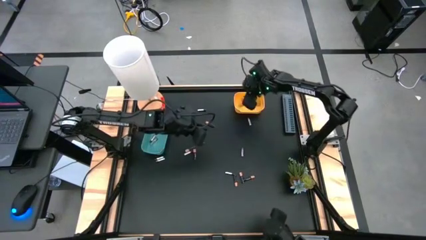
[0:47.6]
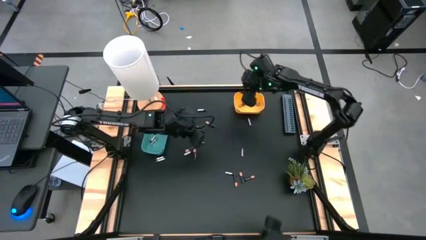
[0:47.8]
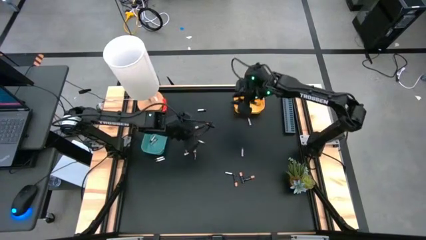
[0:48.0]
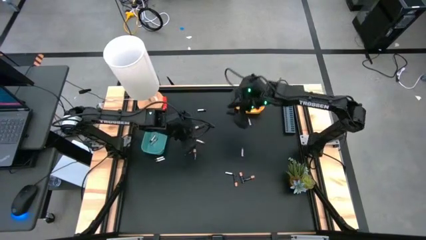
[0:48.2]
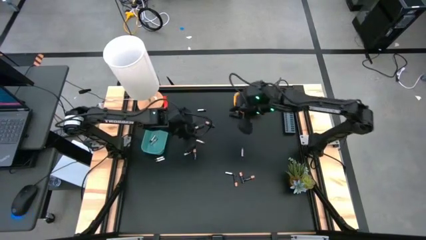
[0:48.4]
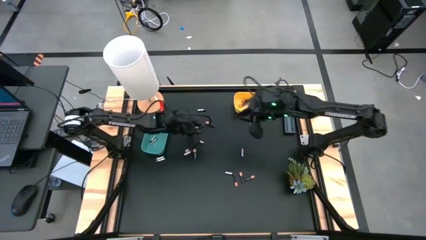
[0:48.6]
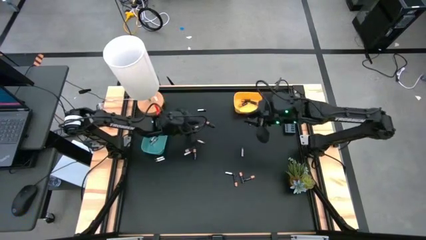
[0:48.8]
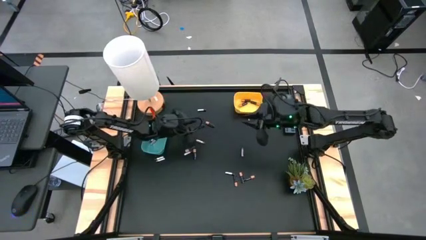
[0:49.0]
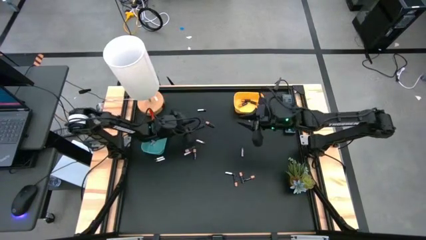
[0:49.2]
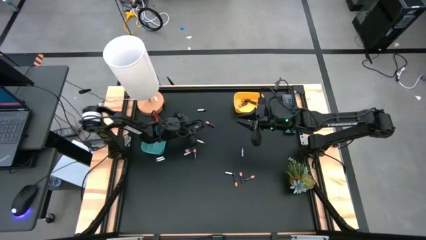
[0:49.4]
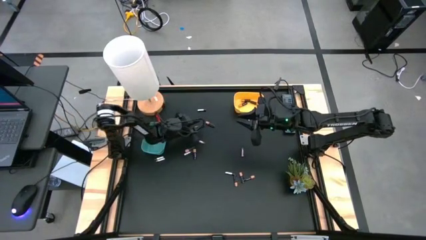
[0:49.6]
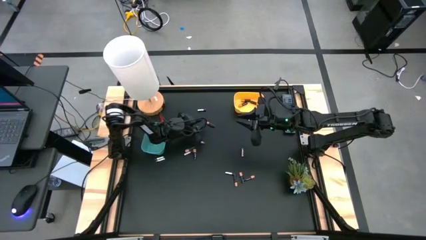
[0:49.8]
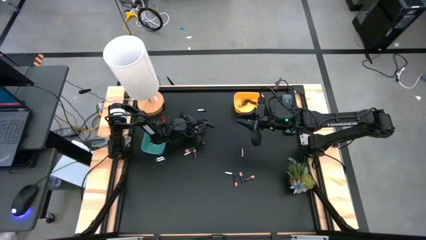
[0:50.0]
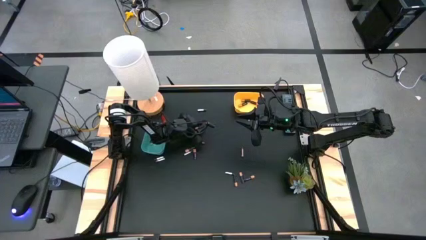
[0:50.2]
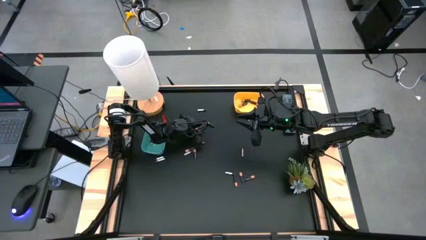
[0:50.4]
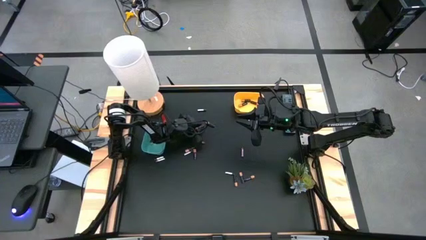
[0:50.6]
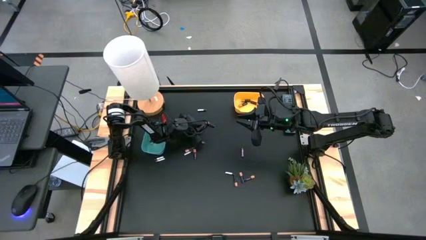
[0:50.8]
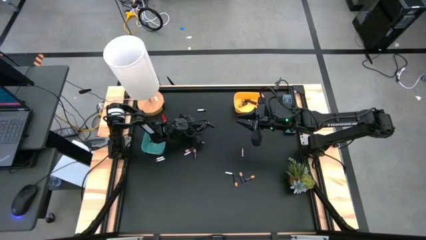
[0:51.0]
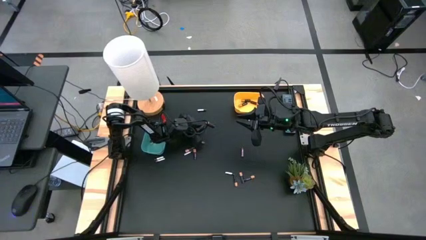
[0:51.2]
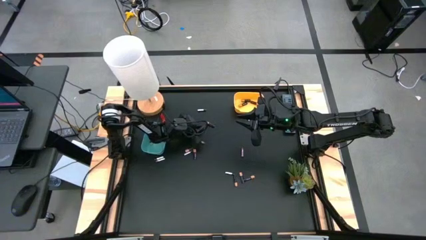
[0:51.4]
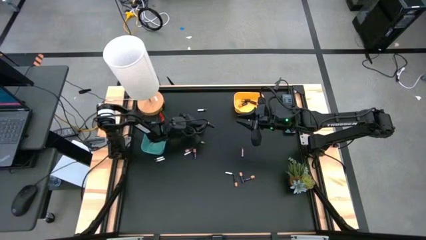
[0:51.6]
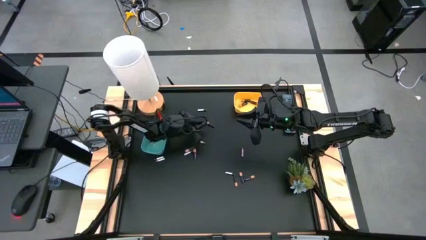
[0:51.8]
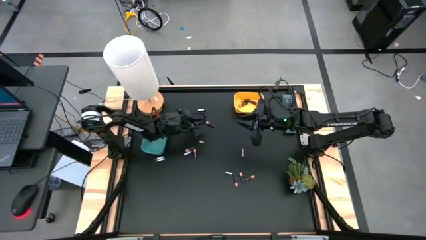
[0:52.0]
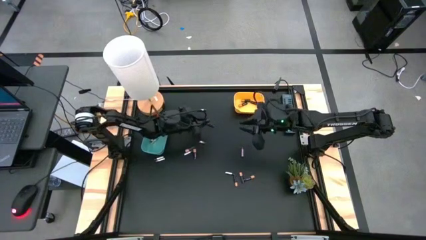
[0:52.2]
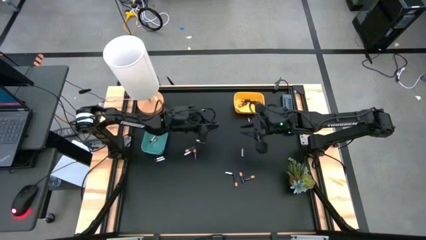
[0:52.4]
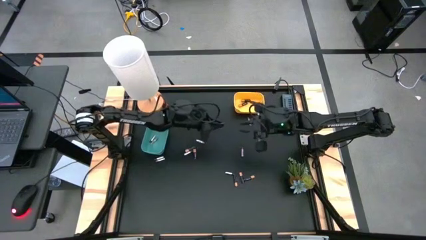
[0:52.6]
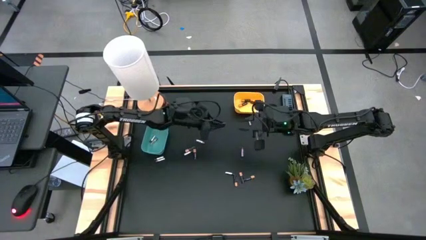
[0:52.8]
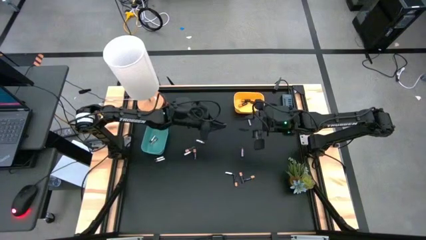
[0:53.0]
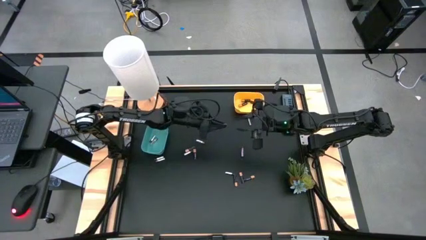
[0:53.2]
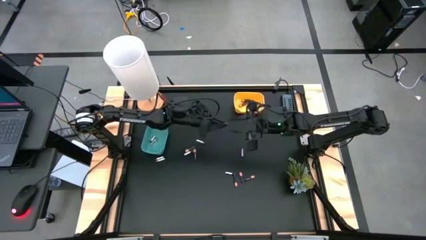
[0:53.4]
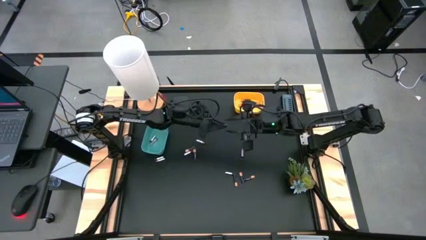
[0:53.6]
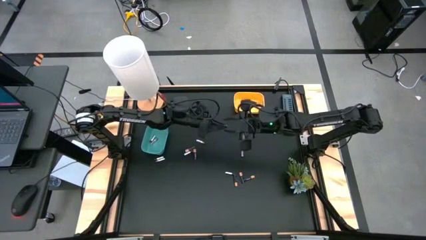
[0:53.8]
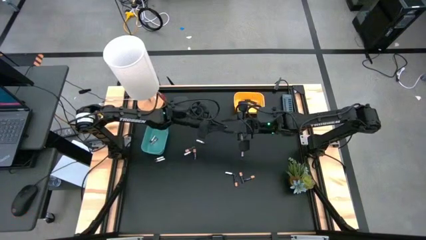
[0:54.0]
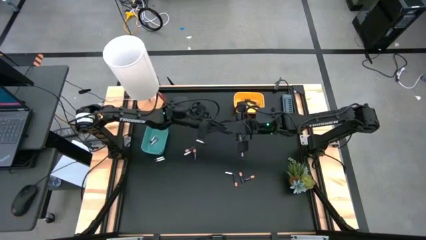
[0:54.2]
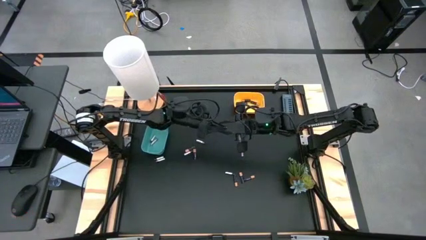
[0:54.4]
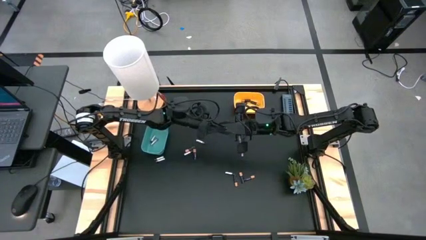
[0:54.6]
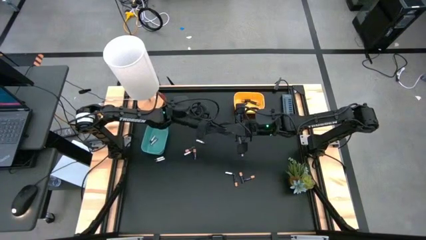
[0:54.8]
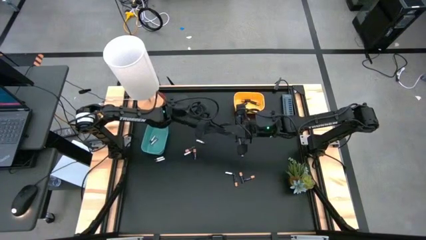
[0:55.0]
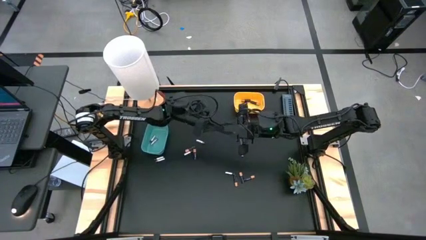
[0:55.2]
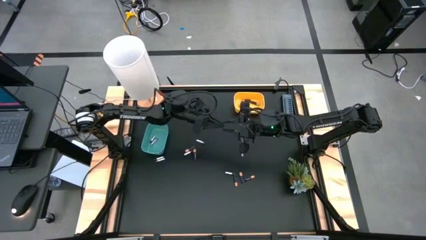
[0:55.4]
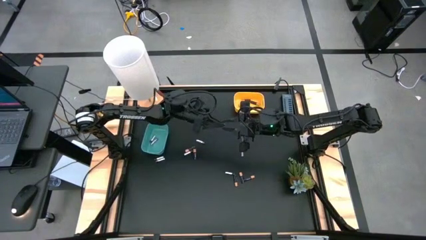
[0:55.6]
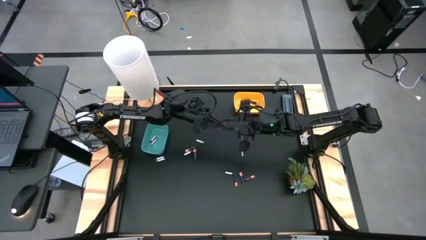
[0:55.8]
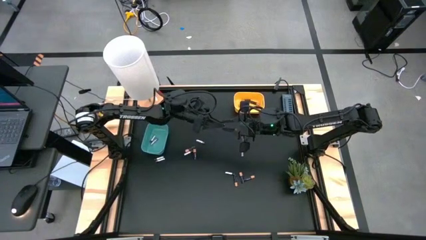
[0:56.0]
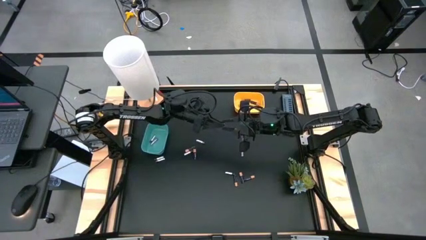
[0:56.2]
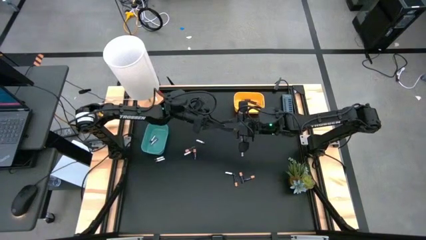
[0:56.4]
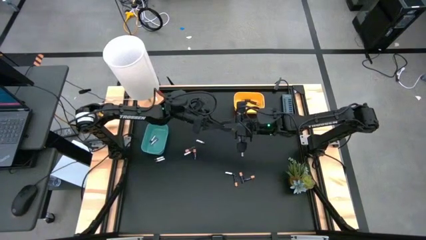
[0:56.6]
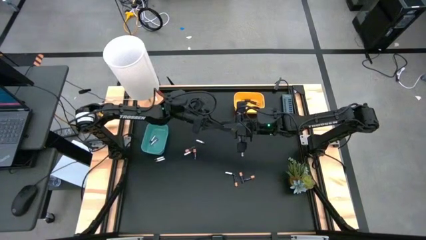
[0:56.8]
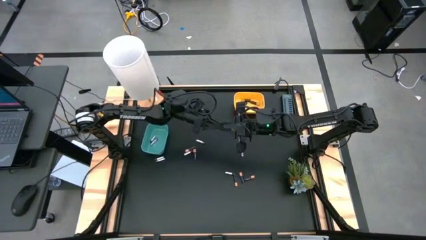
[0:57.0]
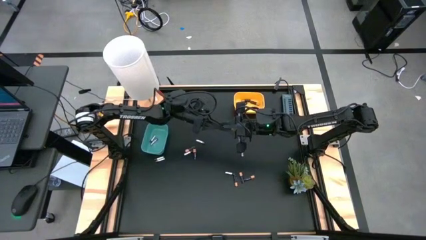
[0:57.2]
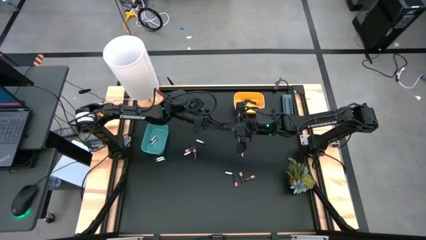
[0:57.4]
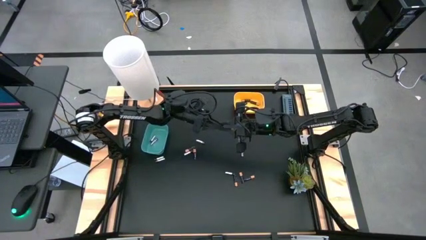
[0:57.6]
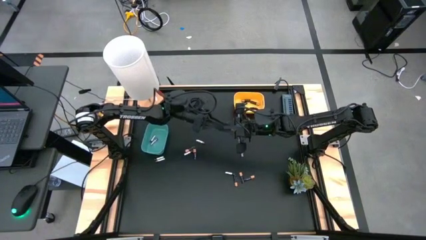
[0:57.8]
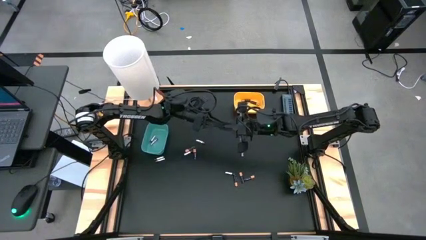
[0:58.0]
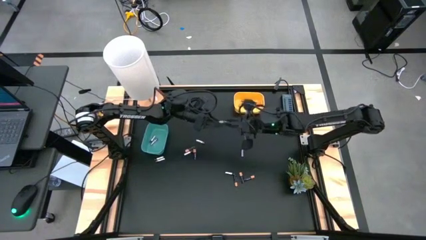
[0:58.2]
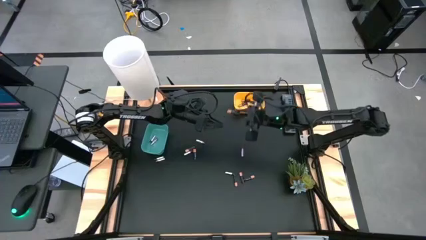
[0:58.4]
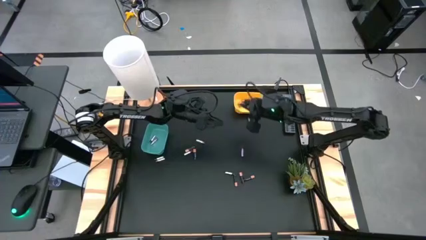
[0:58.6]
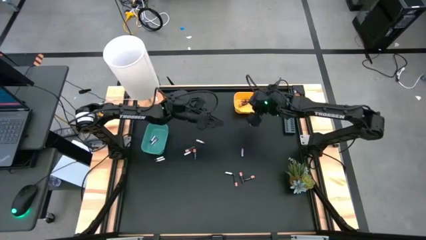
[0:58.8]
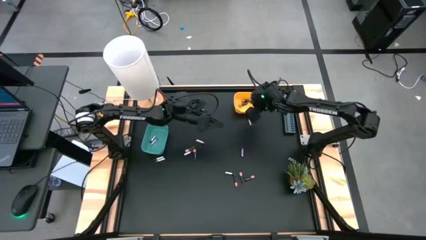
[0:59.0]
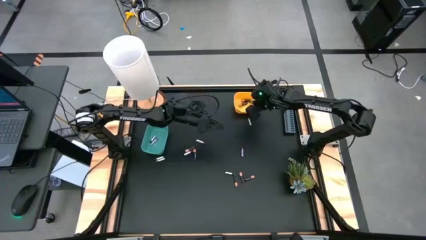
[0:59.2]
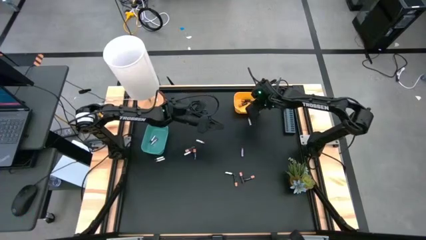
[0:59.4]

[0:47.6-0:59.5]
Task: Sort batteries
Put the black battery into the yellow bin

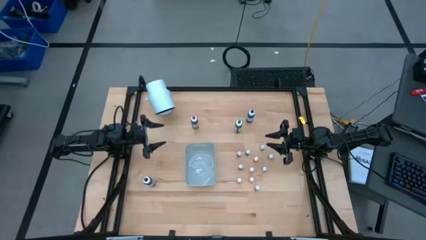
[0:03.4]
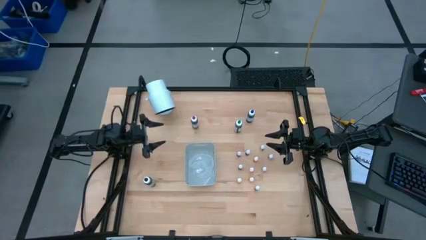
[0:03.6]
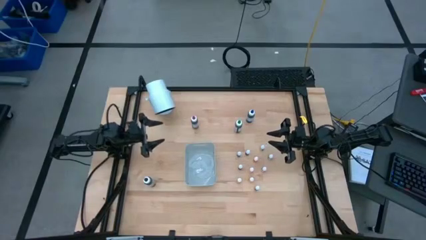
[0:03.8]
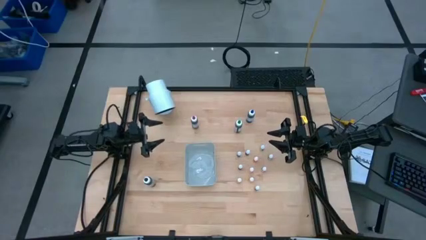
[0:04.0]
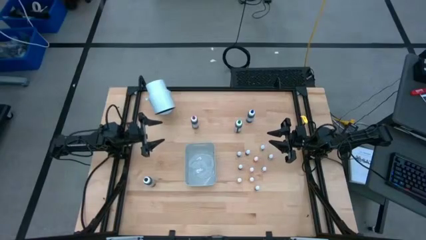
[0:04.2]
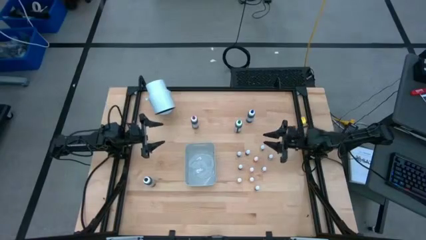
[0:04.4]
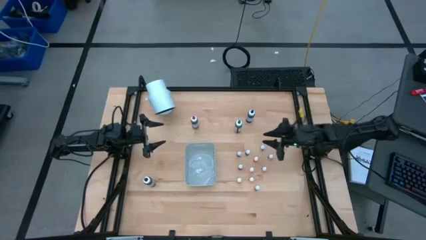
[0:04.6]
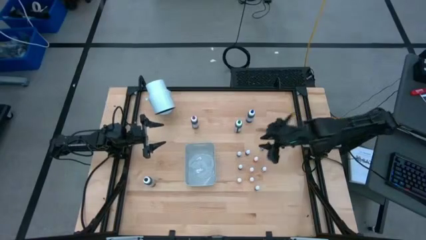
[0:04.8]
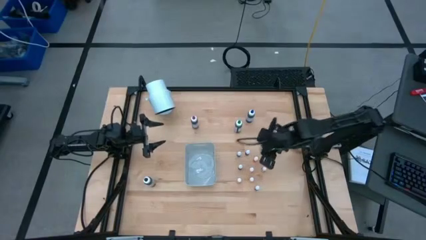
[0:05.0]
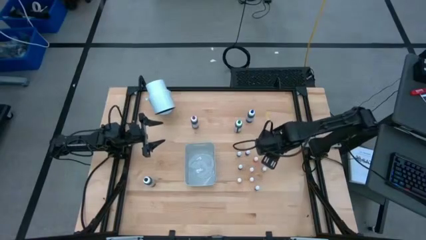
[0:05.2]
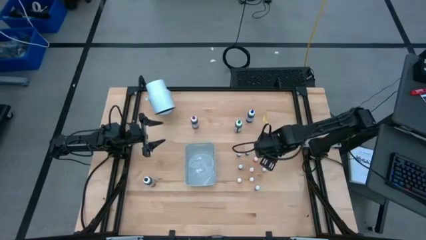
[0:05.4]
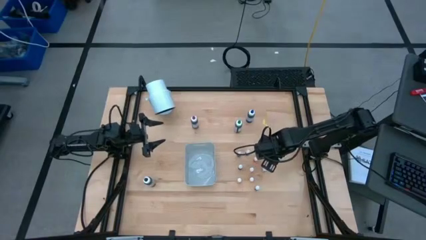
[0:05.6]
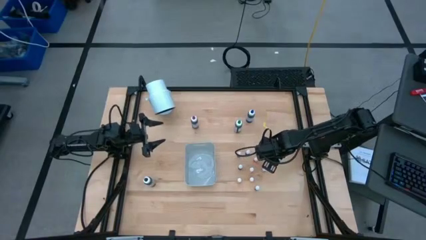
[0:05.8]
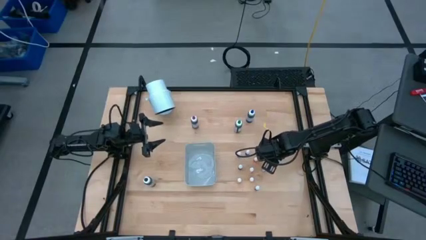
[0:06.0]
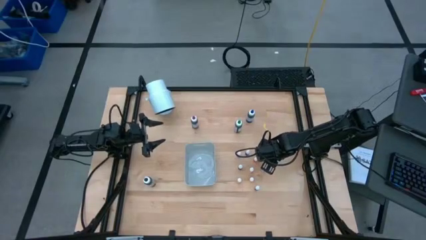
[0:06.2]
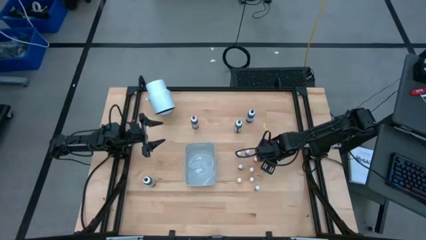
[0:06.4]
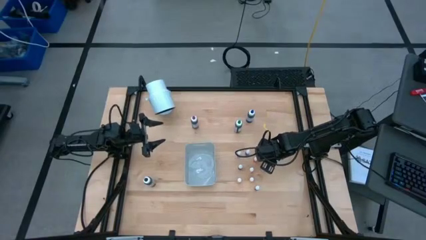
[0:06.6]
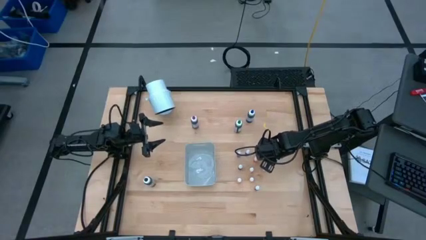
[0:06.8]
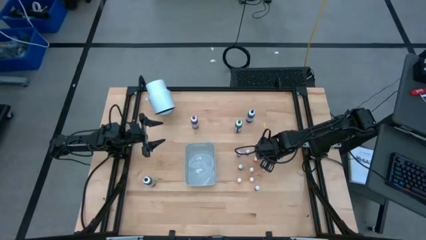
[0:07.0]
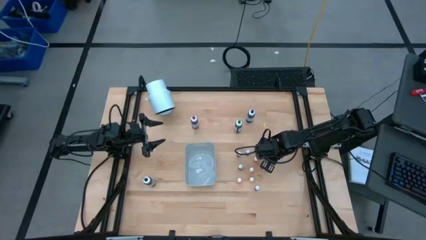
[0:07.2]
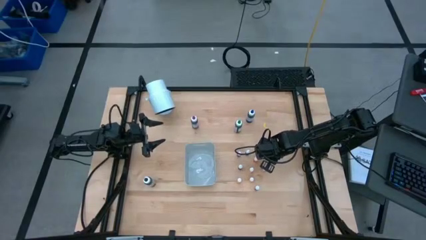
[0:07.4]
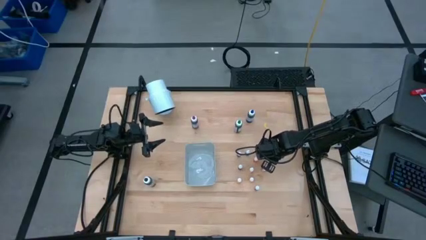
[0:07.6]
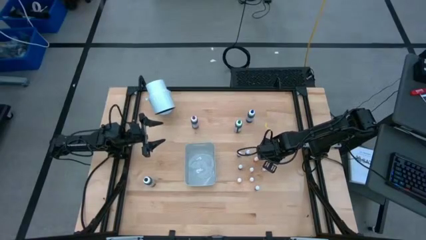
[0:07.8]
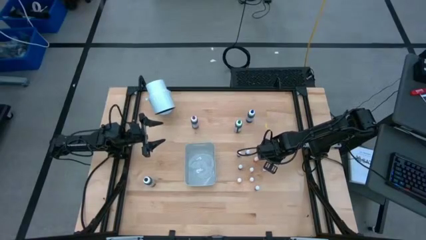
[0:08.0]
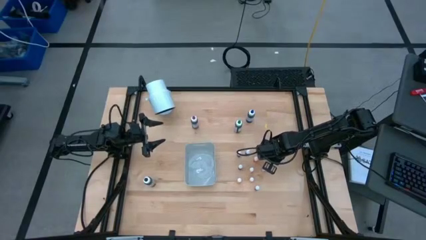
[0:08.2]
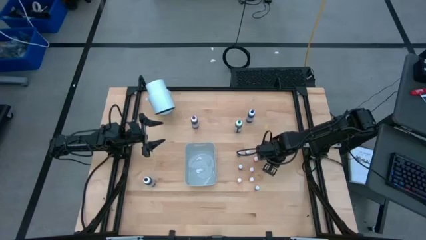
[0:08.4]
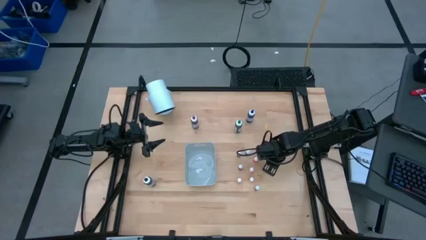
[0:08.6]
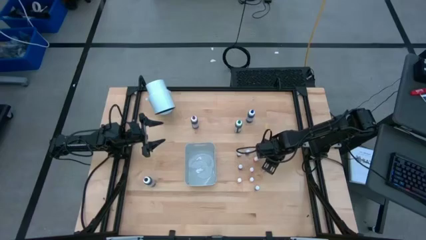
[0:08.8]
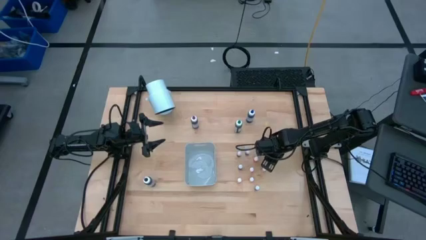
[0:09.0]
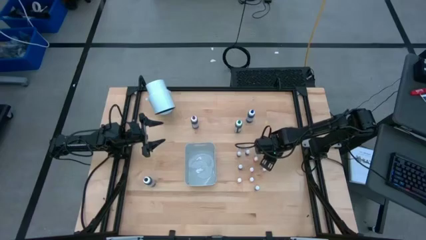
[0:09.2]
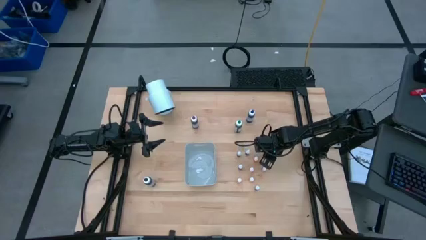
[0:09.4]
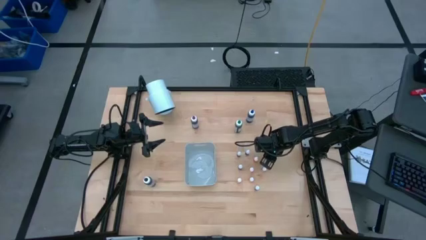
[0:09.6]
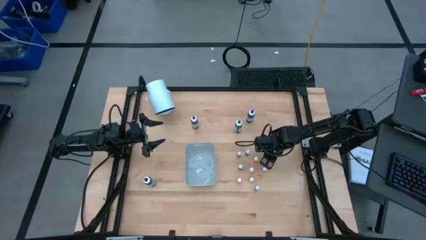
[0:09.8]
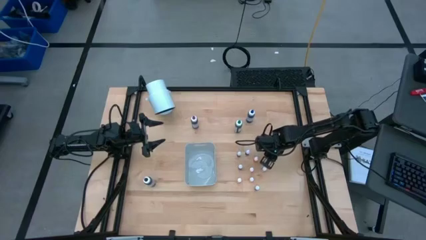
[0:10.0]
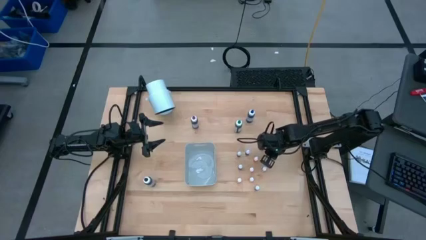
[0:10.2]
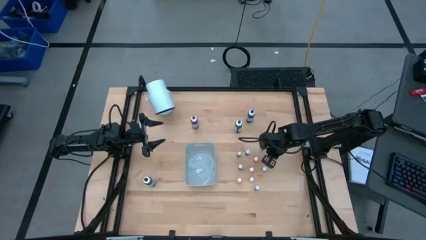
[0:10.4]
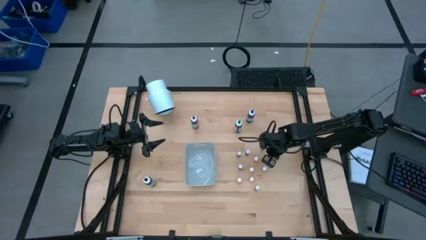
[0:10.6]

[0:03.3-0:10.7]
Task: Pick & Place food coloring
Put the red food coloring bottle into the bin
